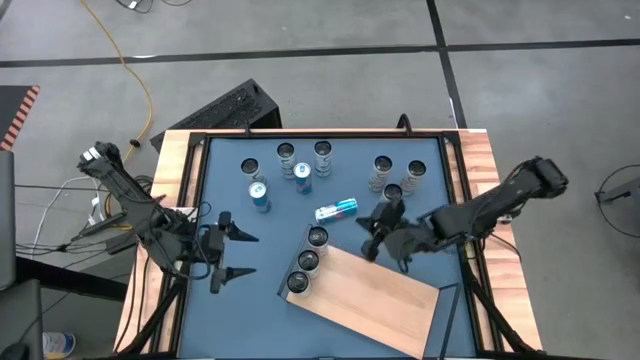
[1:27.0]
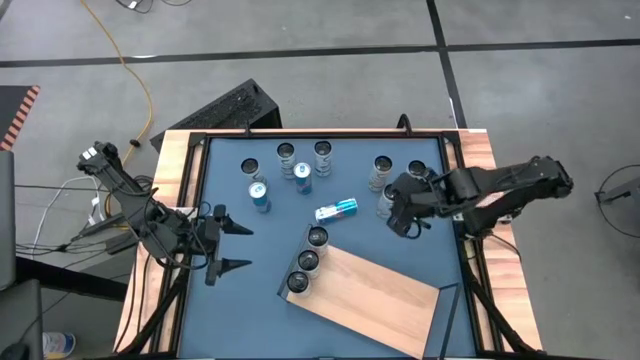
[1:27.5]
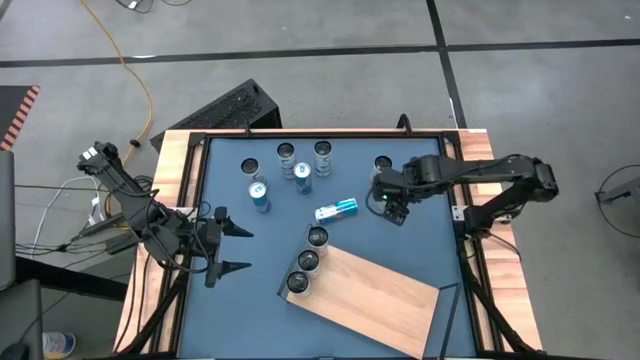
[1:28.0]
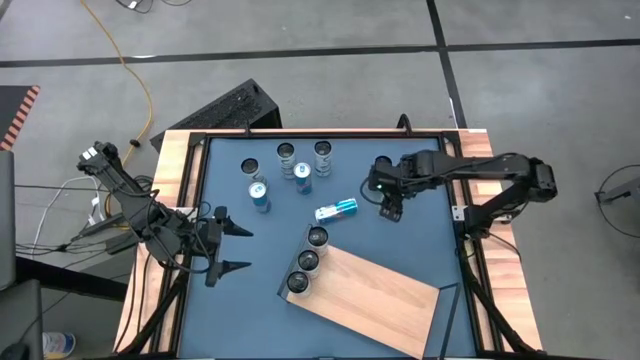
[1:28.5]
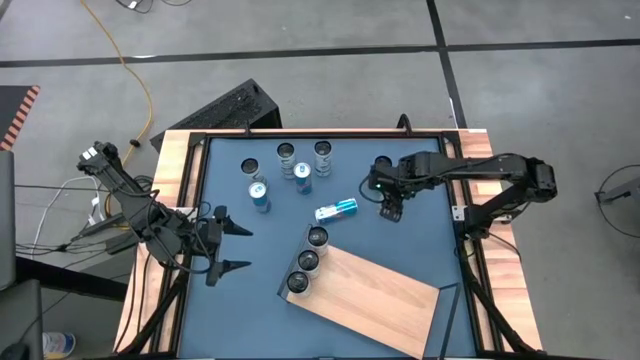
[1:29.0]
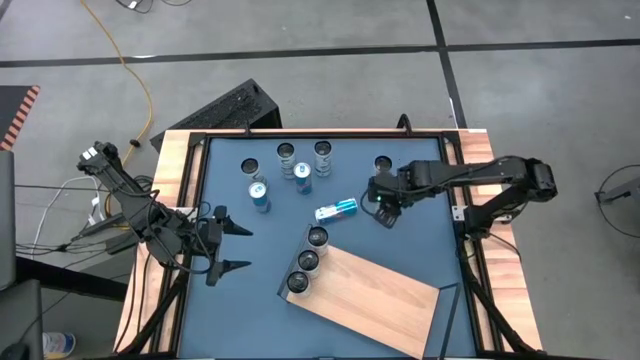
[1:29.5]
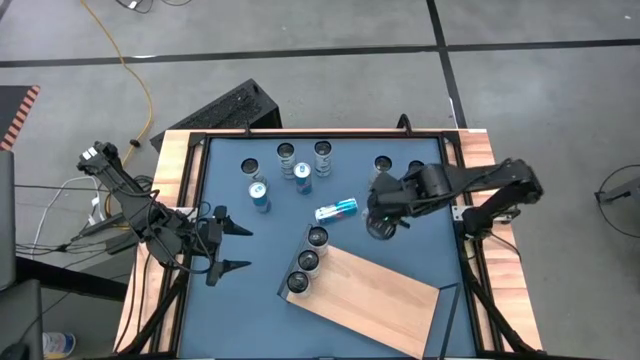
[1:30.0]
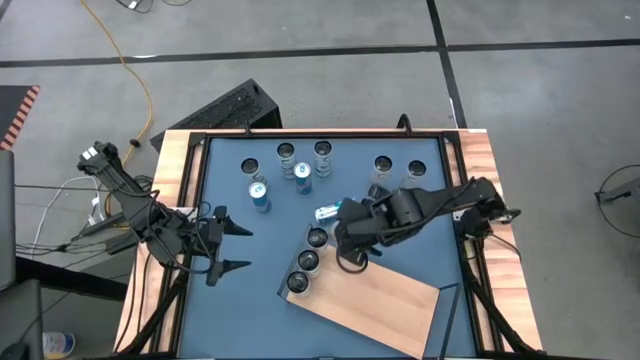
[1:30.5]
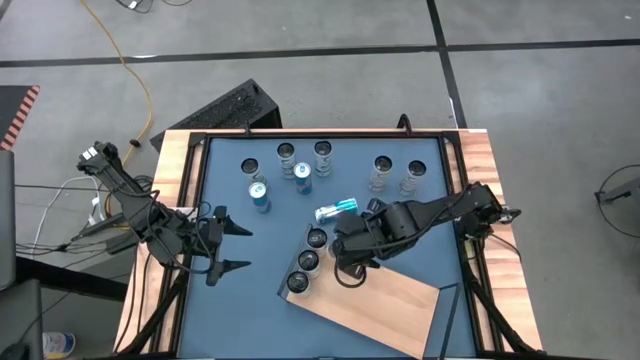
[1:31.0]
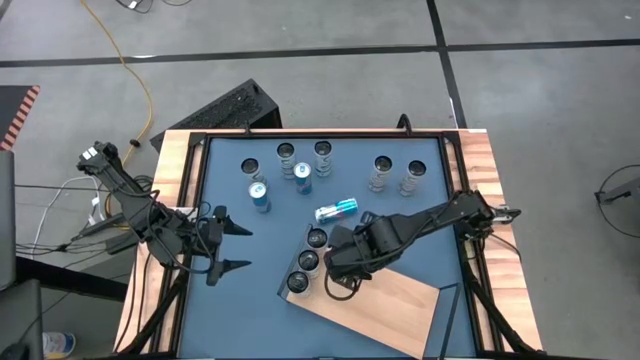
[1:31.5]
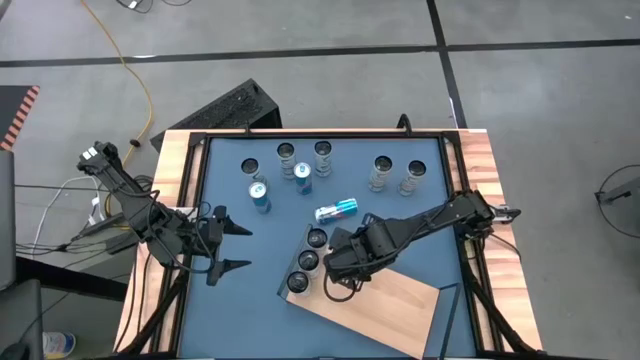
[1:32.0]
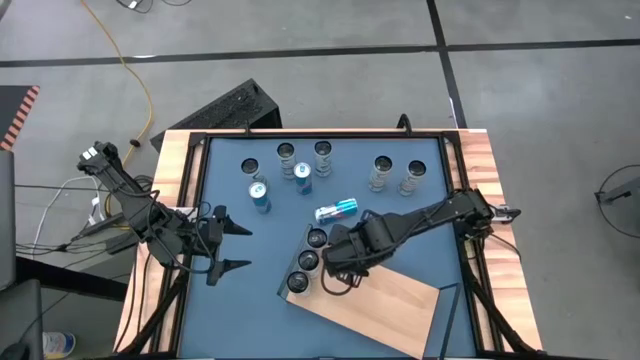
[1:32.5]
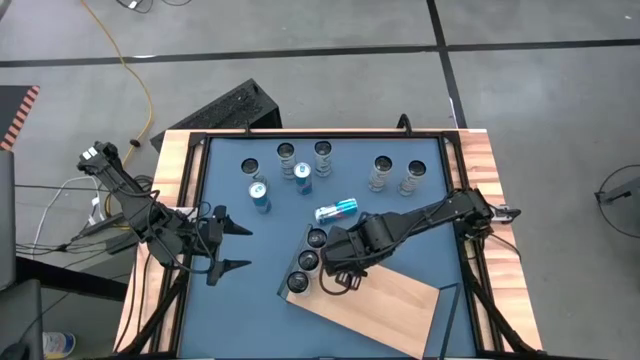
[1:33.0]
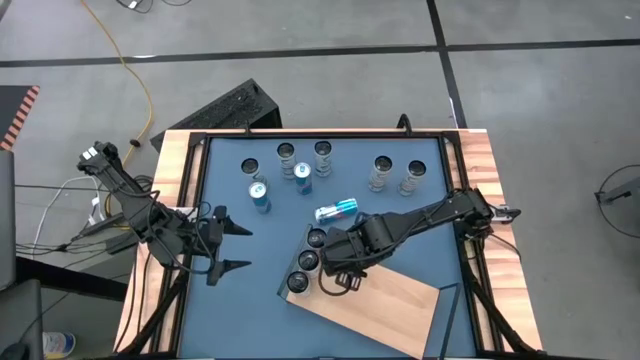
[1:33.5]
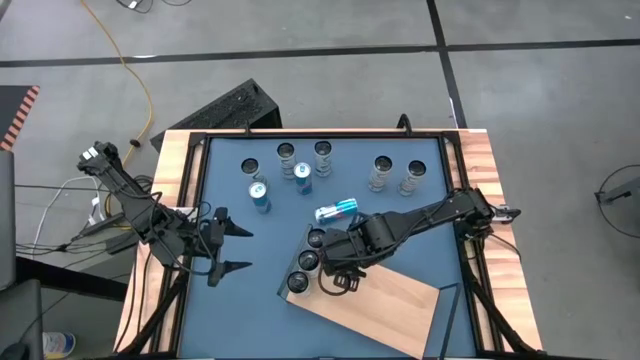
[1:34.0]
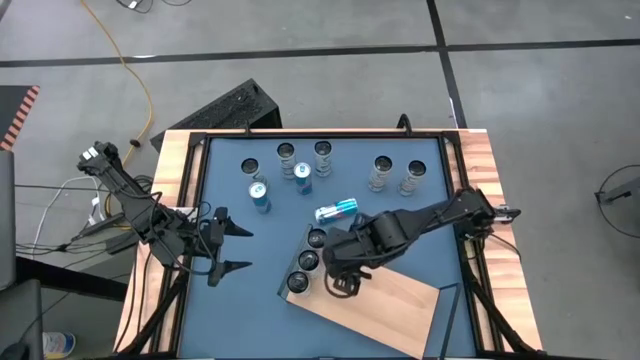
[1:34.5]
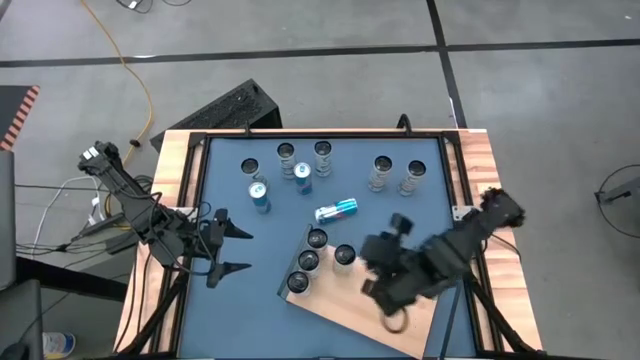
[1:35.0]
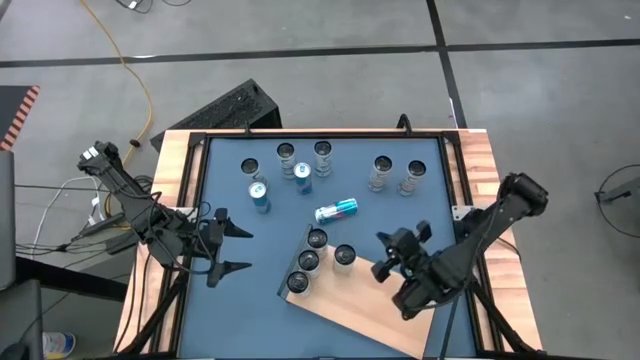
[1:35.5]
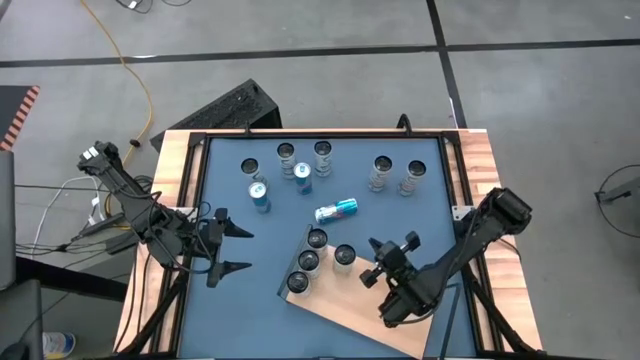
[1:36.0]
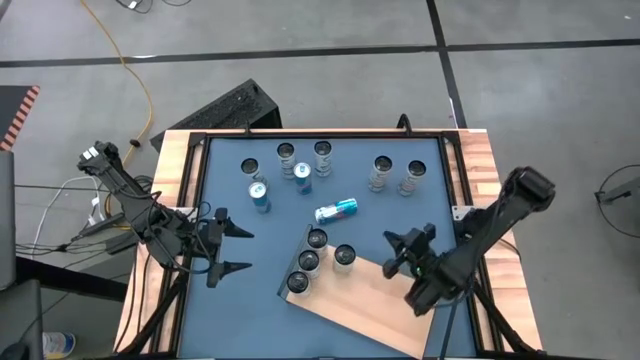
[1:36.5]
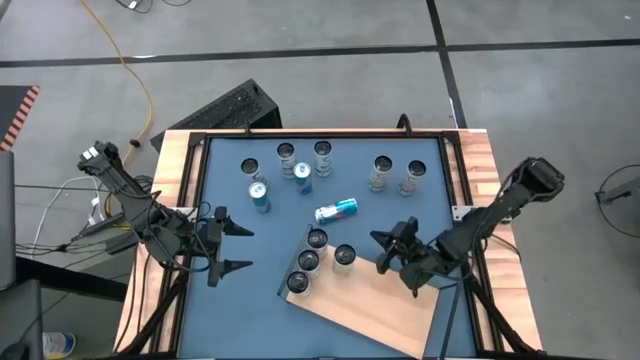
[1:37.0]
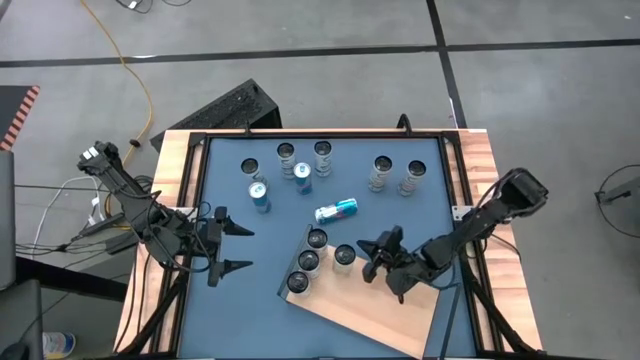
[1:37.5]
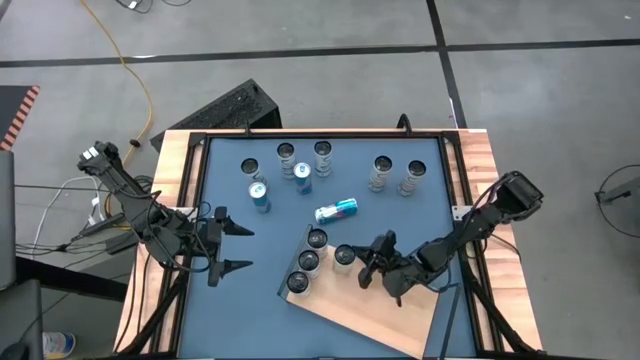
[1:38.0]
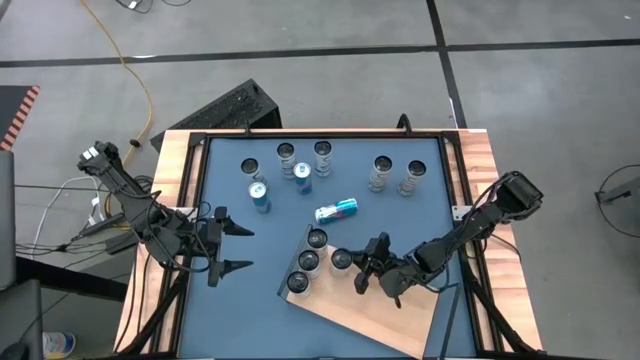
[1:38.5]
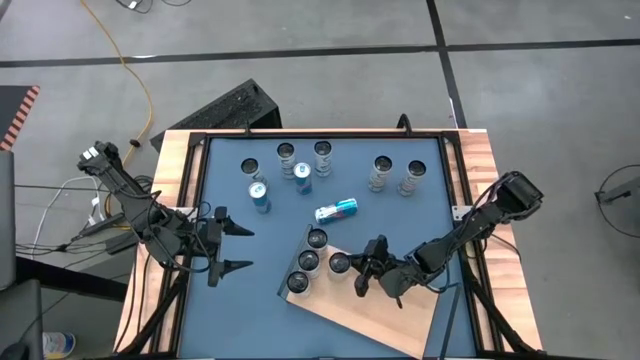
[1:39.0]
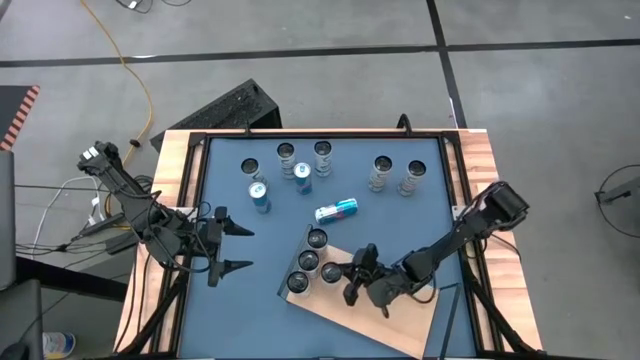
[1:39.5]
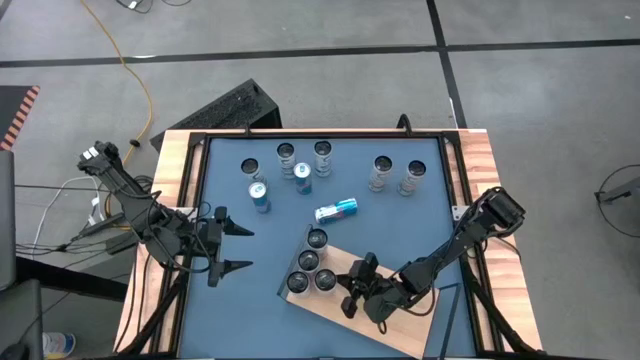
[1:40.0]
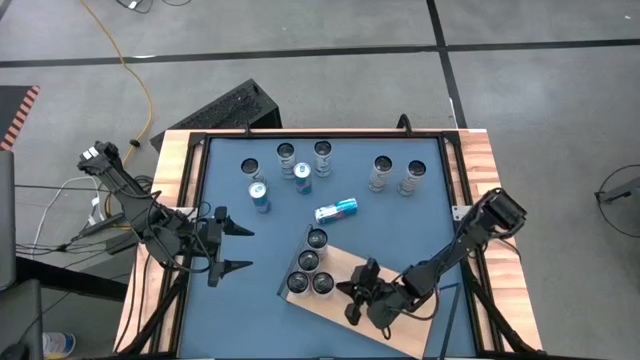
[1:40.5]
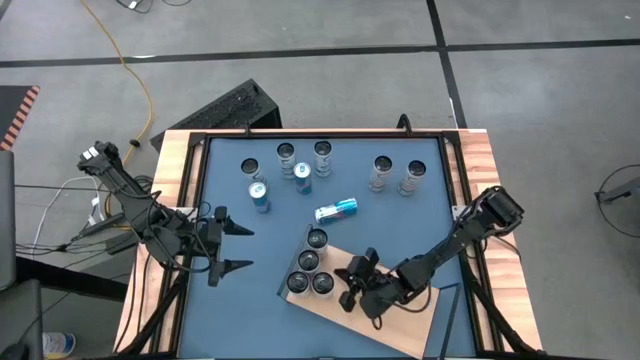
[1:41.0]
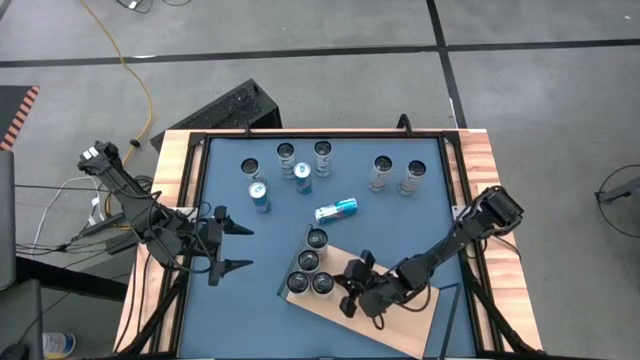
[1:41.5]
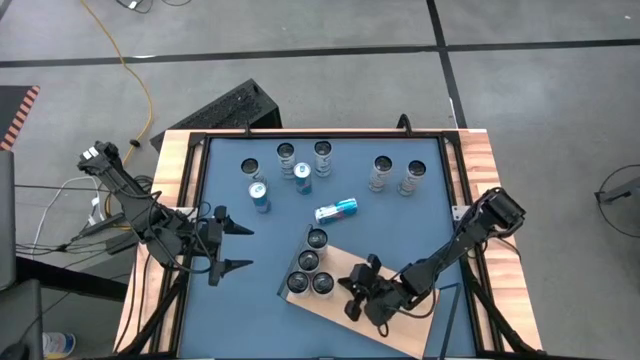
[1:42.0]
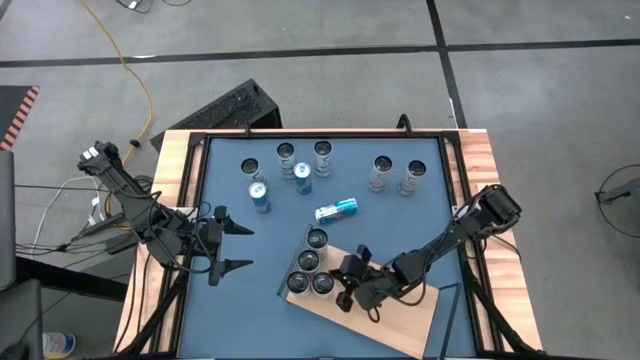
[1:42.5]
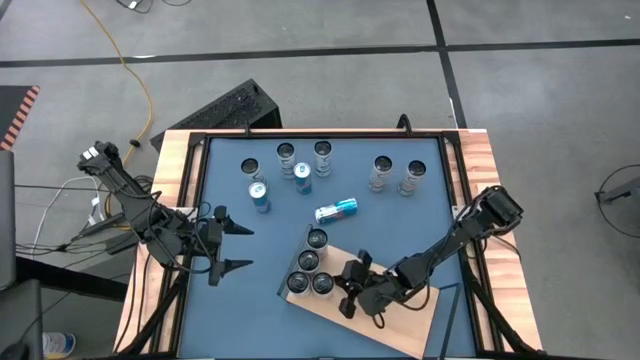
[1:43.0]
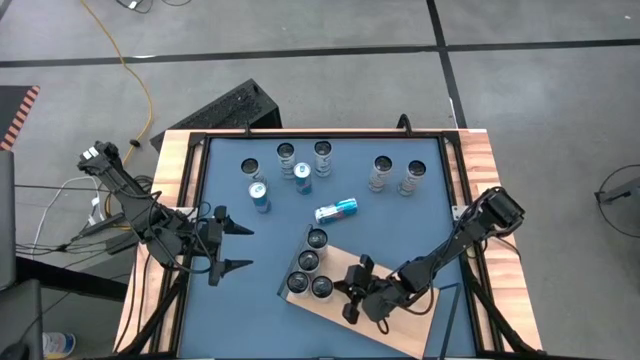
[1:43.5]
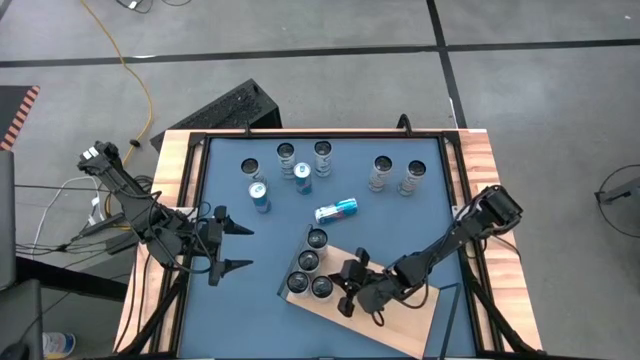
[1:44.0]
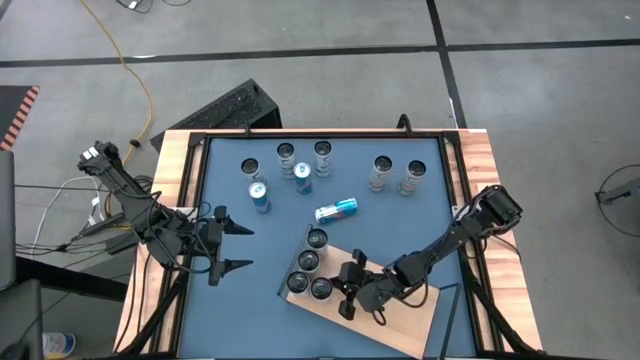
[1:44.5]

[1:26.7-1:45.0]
Task: Place canned beverage on shelf
Put the bottom white yellow soda can on the shelf

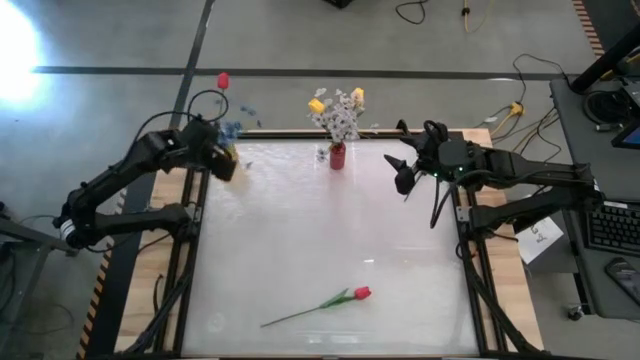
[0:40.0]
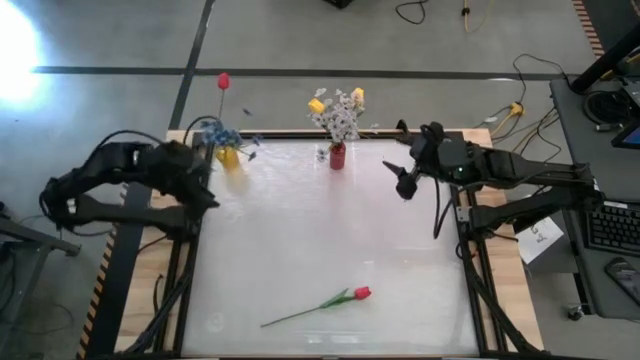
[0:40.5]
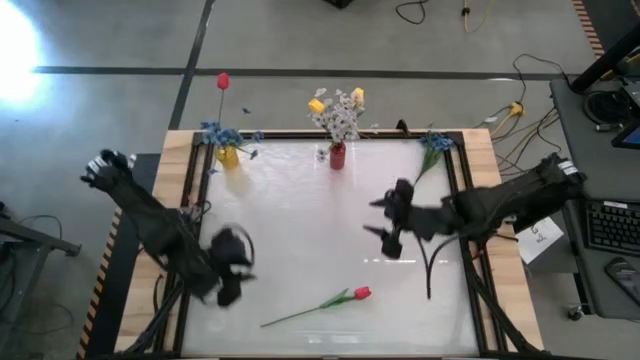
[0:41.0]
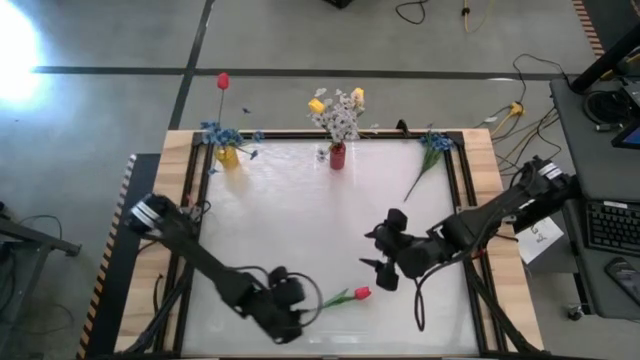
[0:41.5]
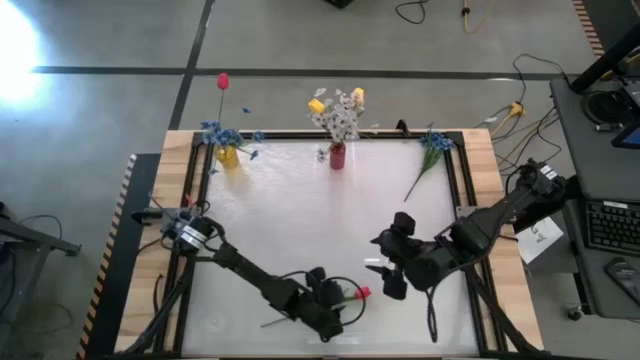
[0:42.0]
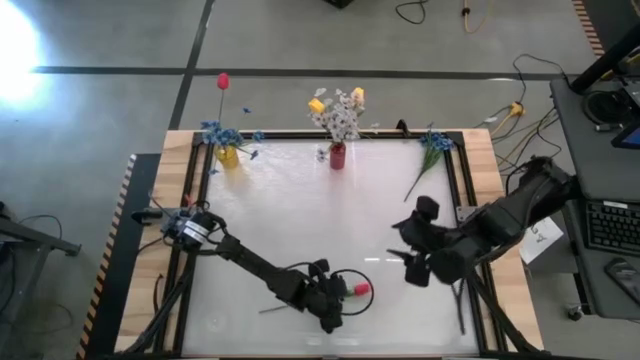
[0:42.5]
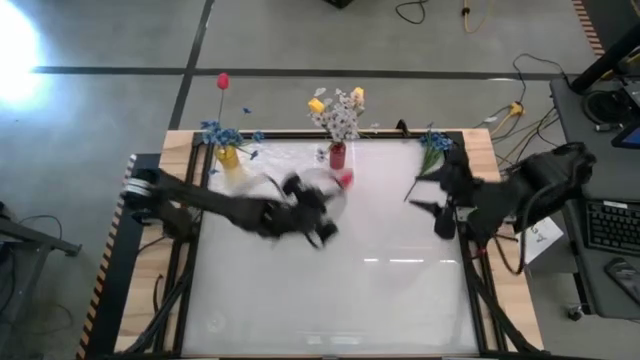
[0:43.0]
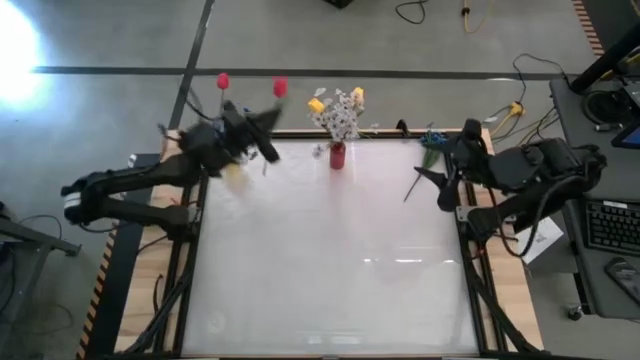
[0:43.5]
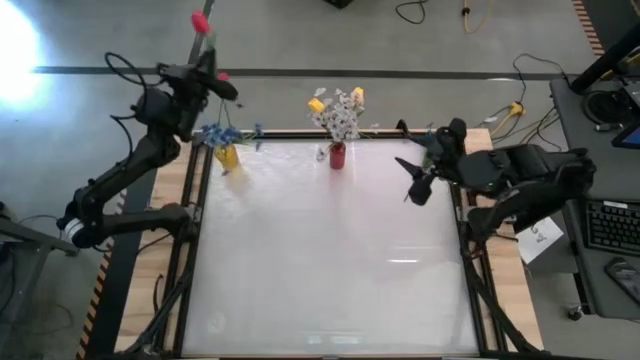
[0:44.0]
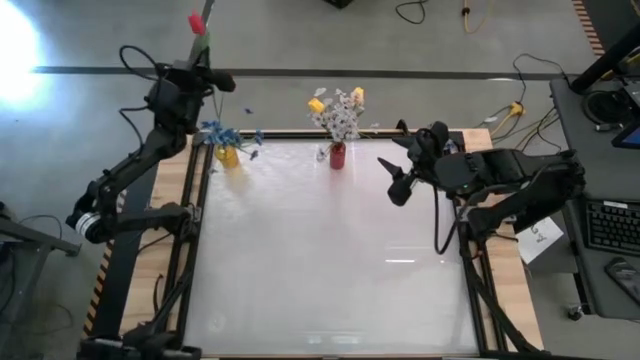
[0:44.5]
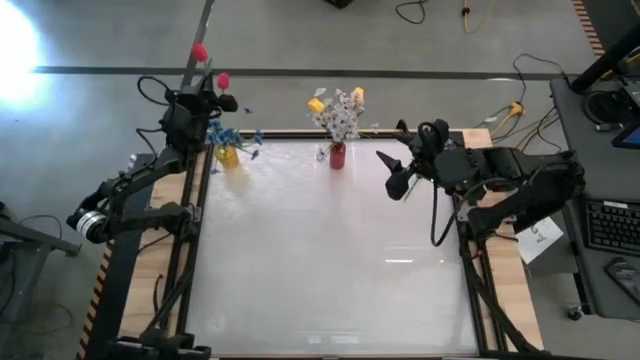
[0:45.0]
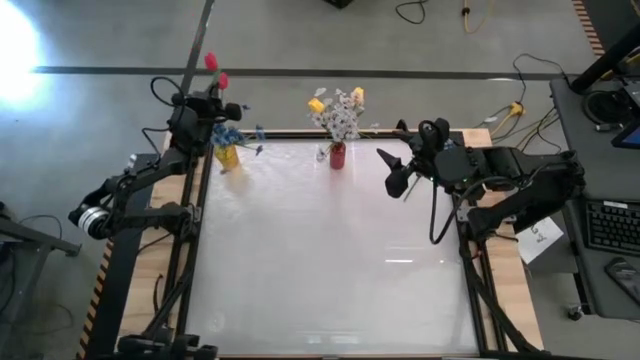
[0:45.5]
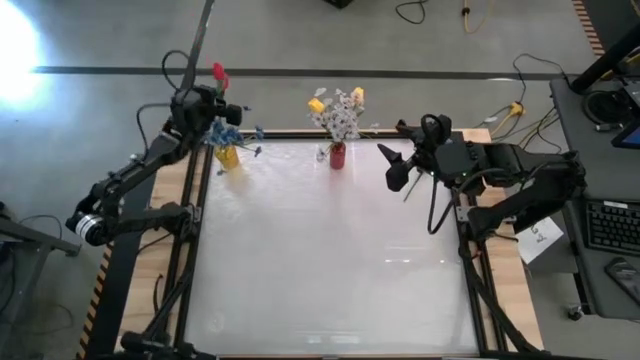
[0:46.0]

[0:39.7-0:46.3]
Task: Sort flowers into vase by color
Put the pink flower into the yellow vase
